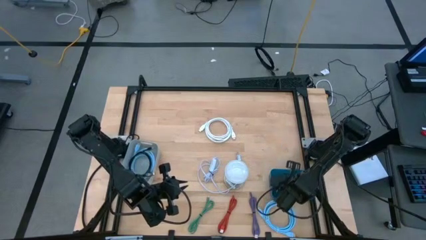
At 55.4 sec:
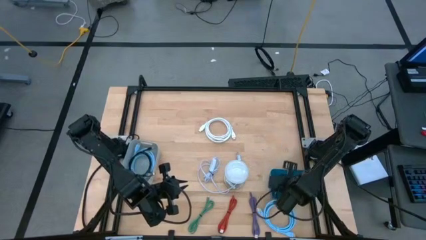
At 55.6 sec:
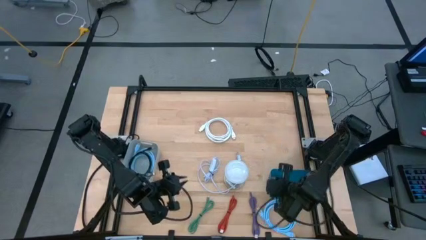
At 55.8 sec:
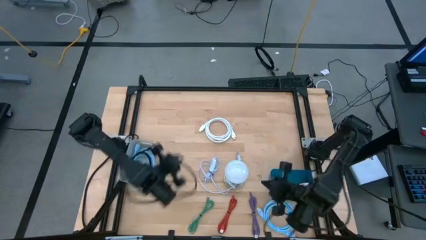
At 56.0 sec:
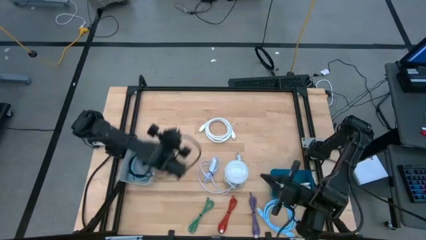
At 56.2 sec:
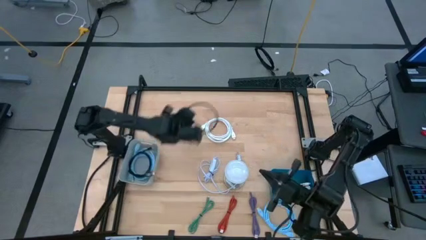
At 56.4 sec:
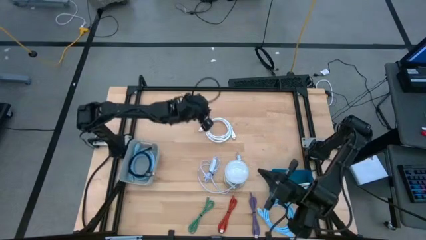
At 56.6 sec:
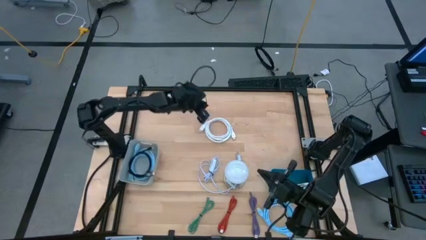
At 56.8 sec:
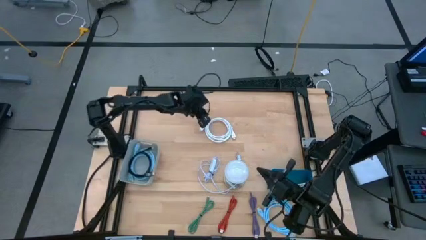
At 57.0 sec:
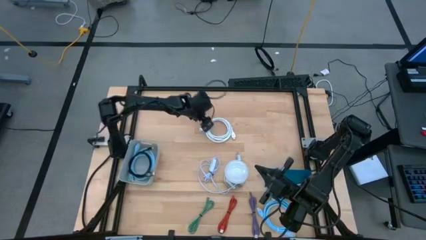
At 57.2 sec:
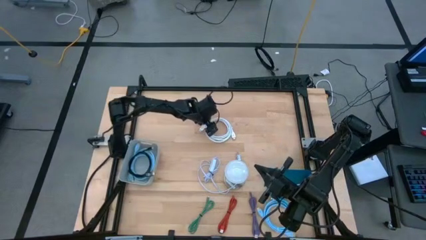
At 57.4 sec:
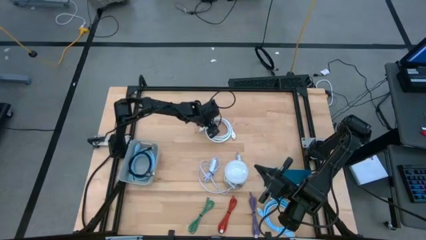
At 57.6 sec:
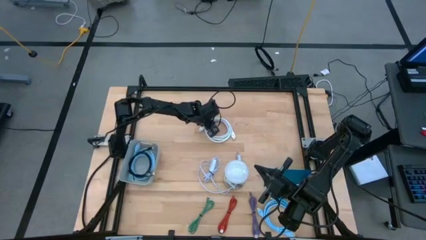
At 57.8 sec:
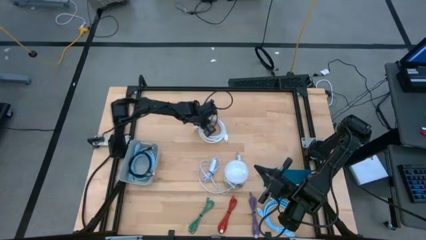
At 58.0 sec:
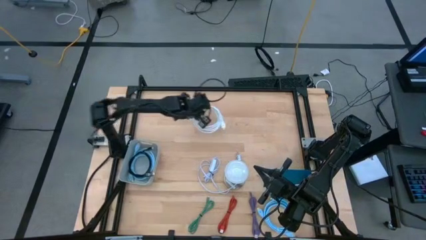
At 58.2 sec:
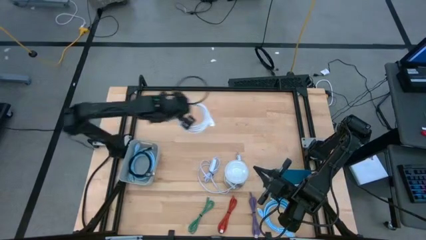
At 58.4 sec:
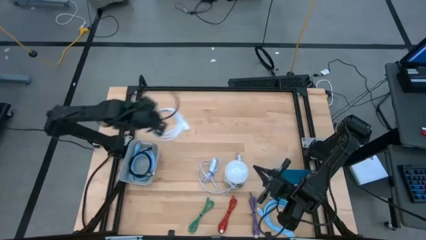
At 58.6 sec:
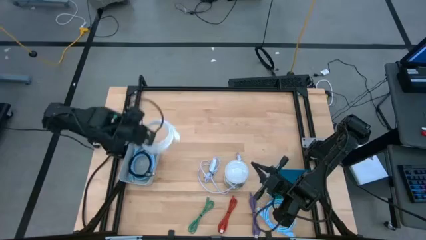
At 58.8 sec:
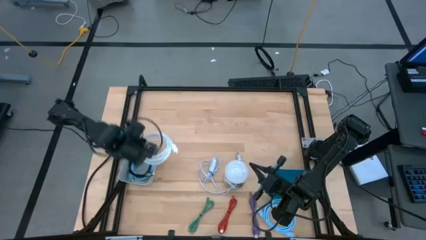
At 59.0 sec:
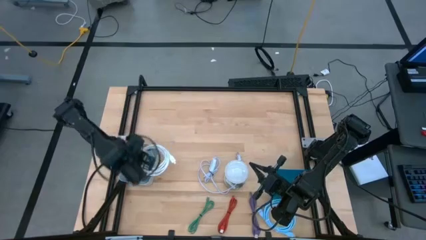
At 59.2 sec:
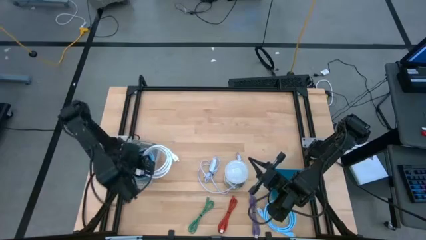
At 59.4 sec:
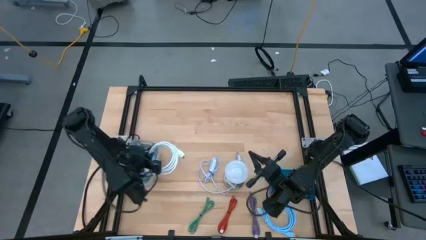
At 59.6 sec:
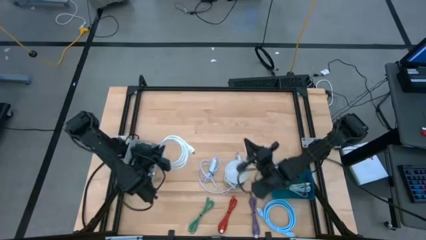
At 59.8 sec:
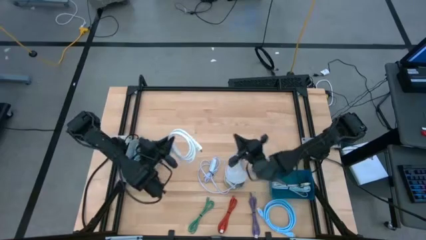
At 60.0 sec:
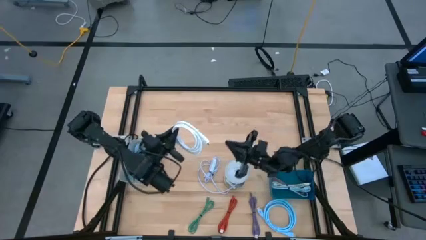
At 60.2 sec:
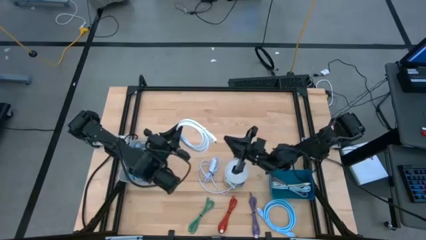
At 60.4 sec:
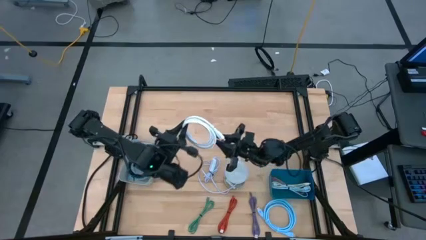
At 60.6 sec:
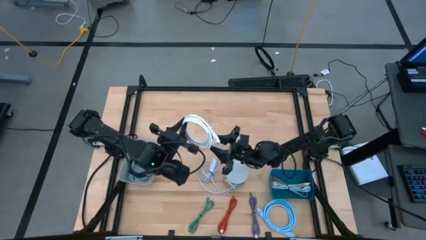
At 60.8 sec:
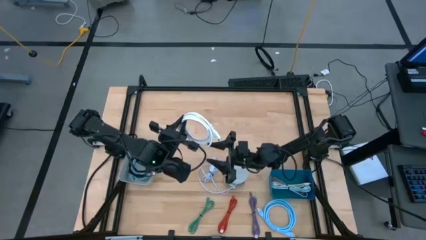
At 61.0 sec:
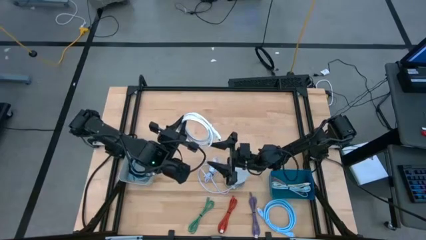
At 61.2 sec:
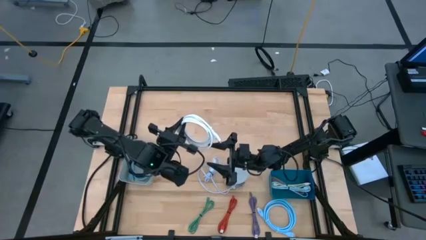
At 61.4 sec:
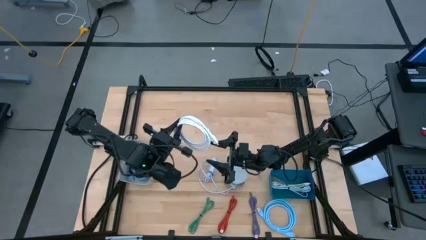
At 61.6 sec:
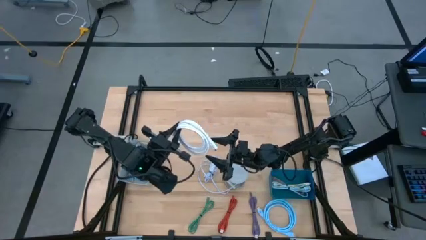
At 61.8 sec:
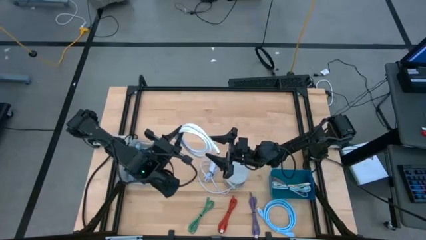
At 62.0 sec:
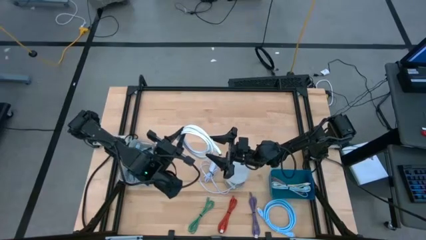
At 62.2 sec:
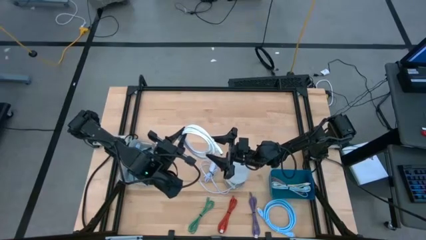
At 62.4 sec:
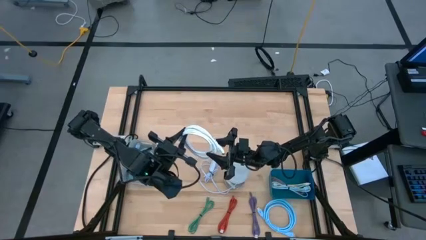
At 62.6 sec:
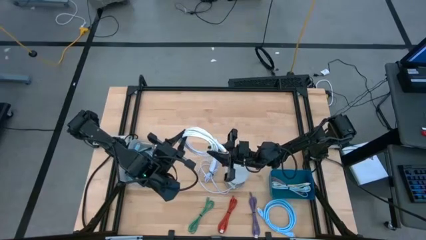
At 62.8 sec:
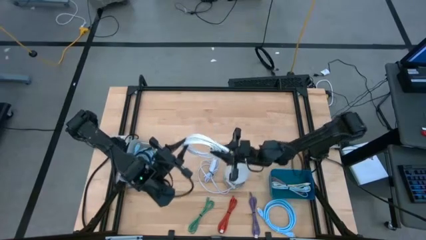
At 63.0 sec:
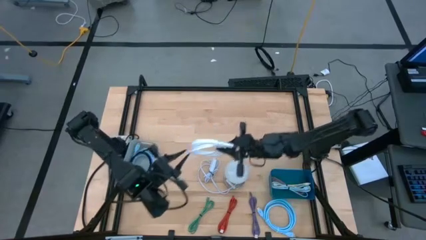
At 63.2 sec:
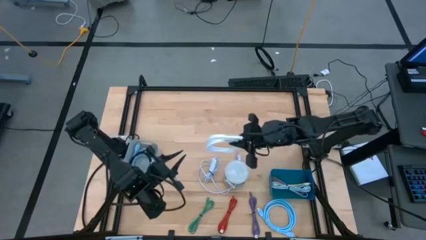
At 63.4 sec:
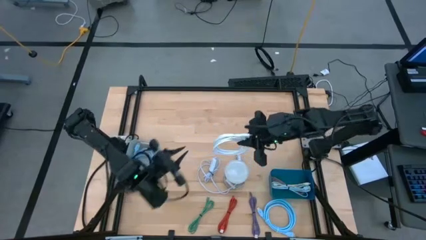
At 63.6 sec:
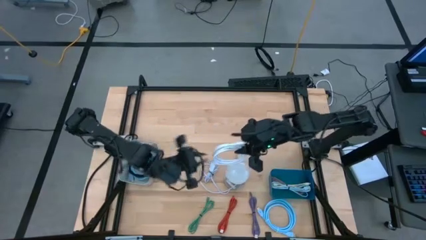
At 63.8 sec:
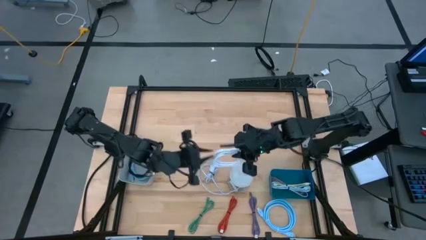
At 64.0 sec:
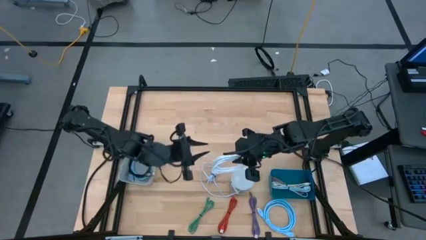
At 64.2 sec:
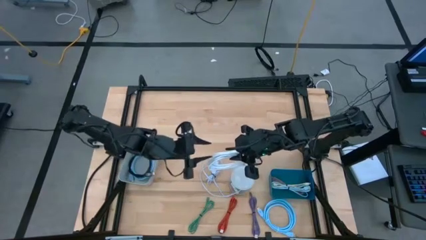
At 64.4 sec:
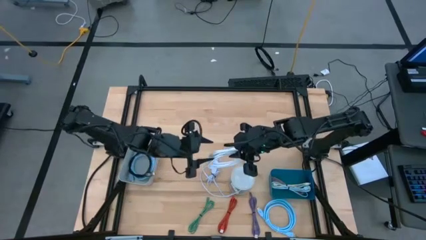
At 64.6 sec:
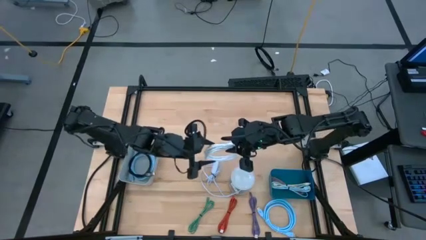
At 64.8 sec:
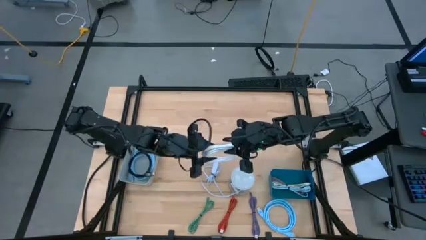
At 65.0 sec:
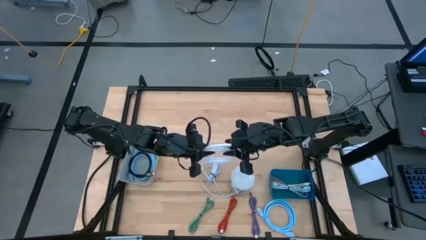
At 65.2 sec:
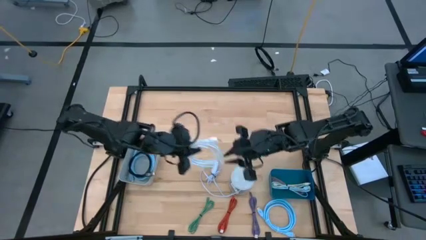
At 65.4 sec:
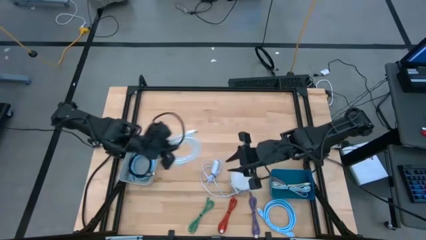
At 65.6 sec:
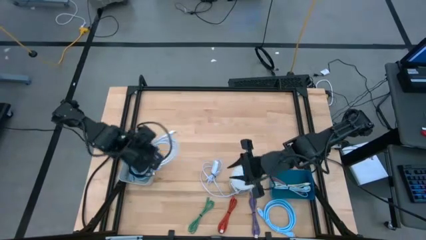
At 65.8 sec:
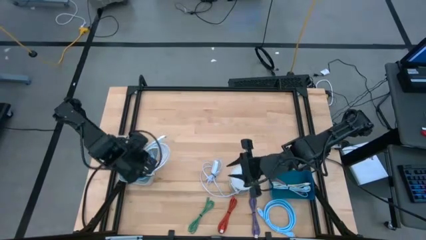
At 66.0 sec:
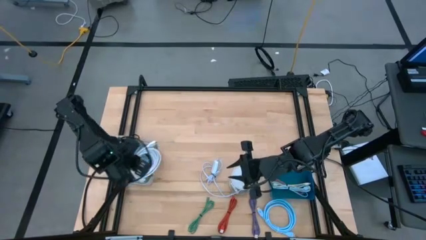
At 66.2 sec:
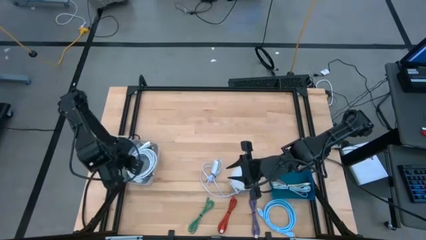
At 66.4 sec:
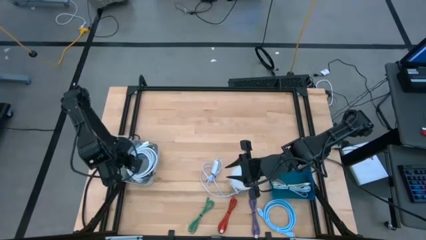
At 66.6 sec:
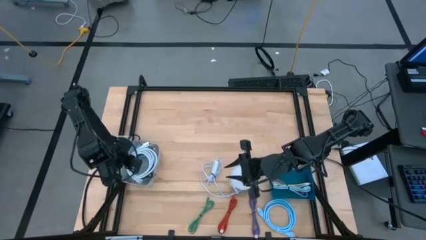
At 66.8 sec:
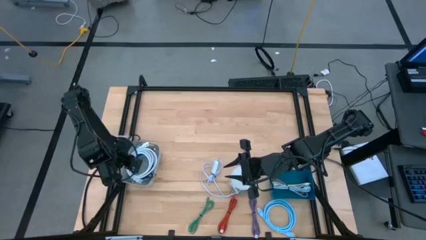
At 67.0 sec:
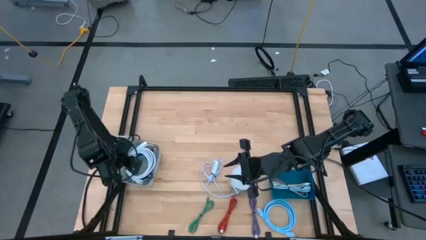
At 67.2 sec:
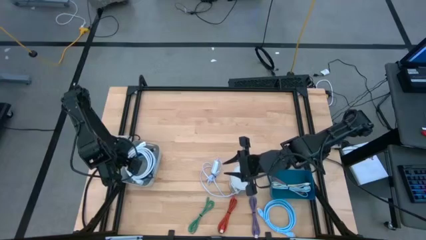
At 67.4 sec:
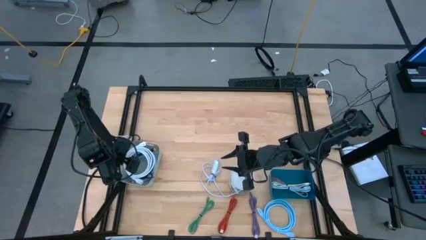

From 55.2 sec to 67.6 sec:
Task: Pick & Place USB Port
Put the white HDMI cable into the gray bin
